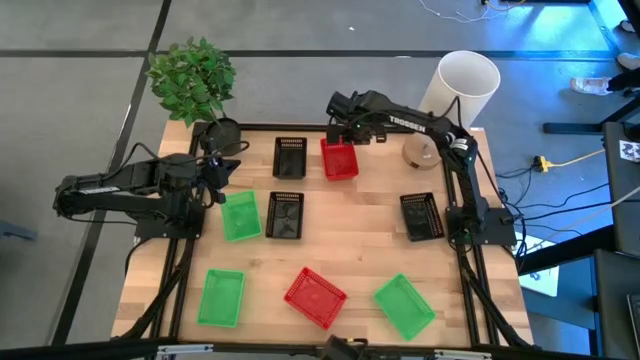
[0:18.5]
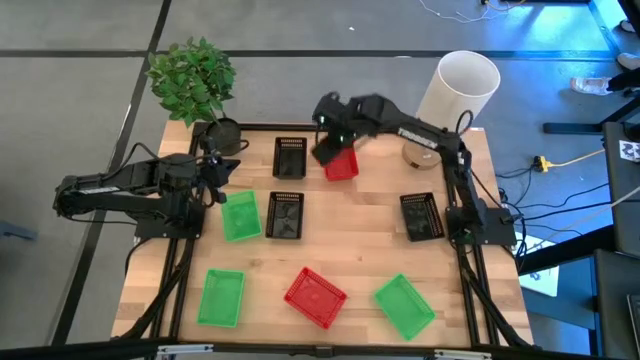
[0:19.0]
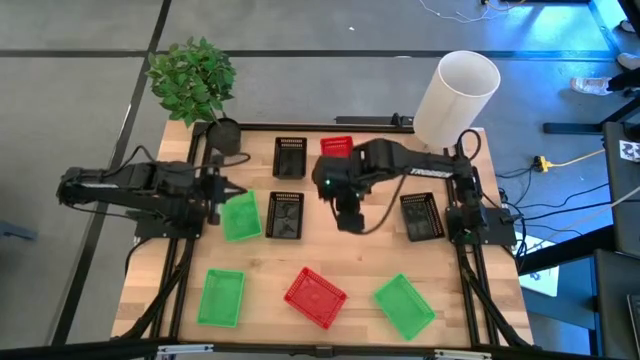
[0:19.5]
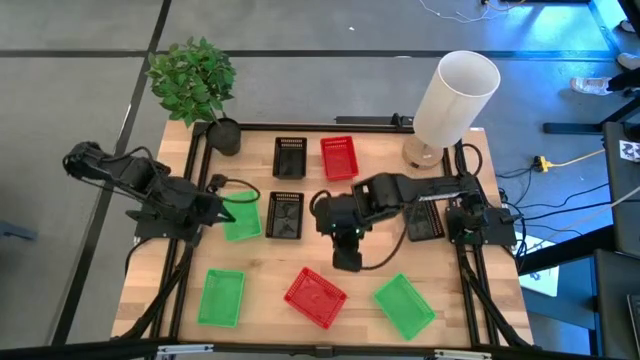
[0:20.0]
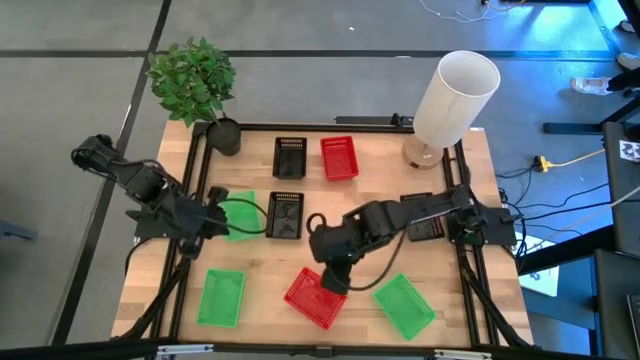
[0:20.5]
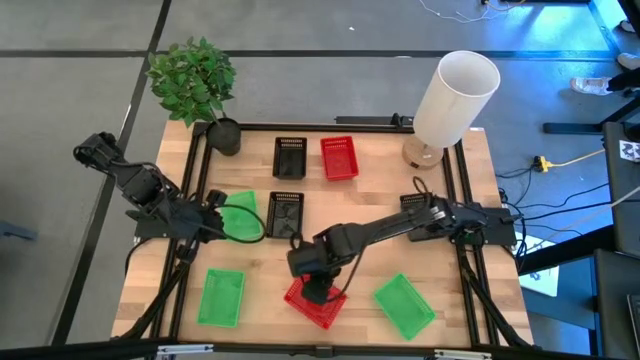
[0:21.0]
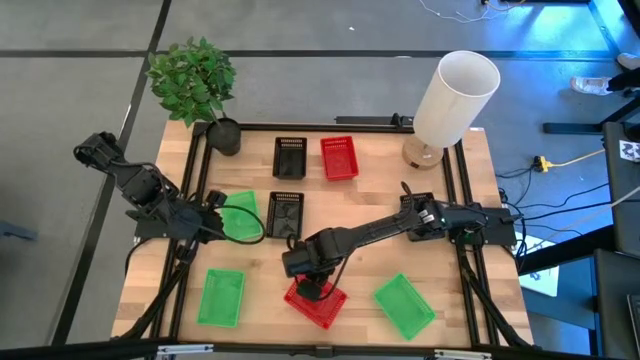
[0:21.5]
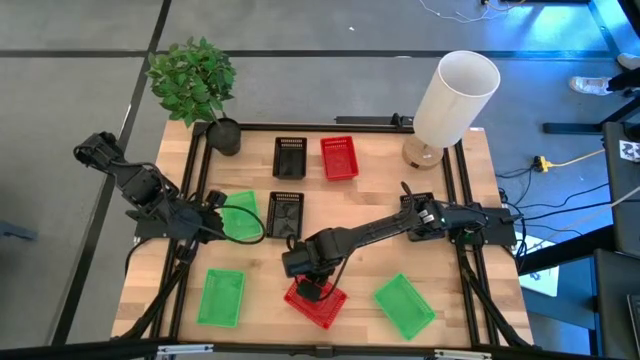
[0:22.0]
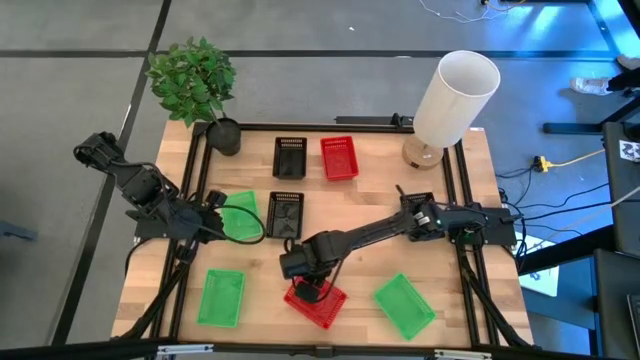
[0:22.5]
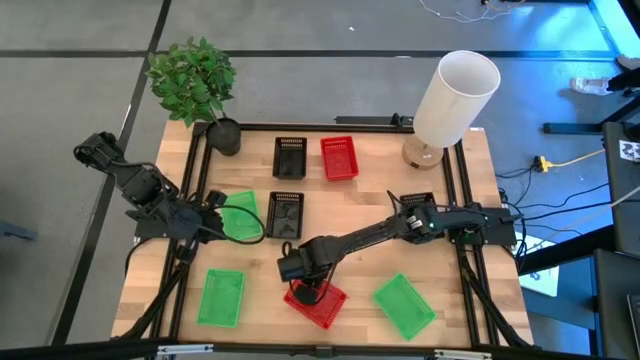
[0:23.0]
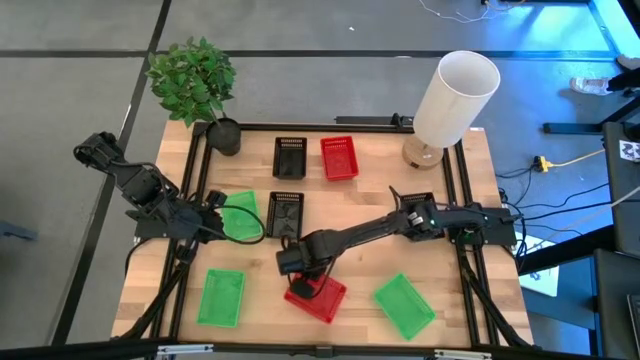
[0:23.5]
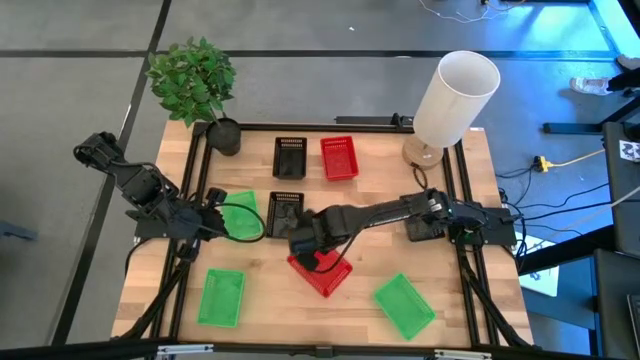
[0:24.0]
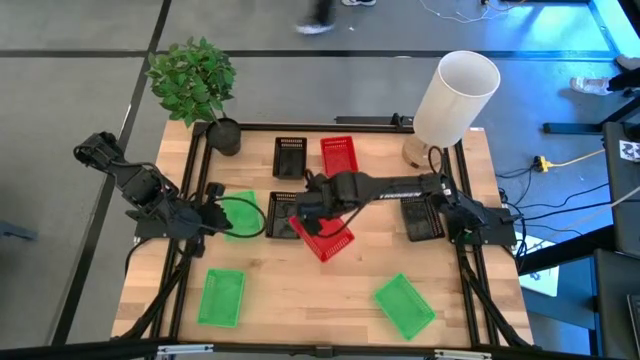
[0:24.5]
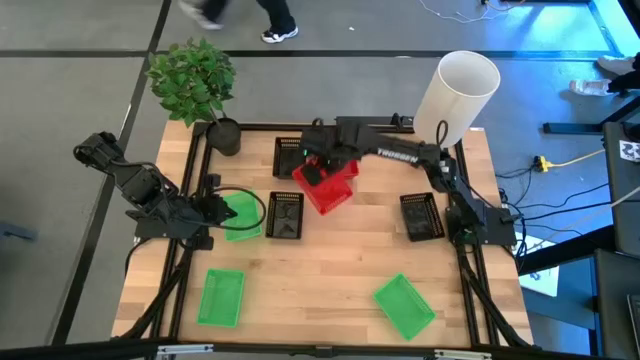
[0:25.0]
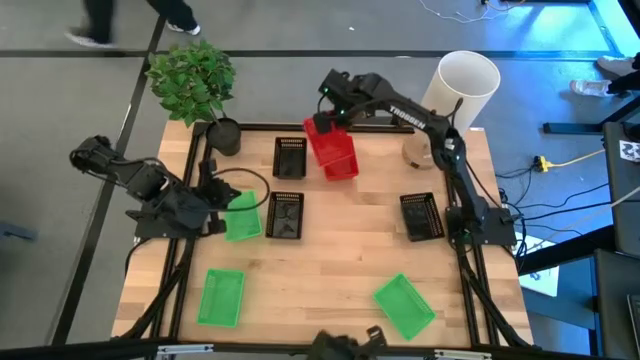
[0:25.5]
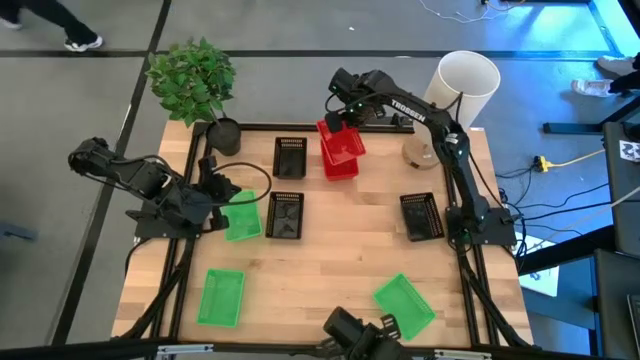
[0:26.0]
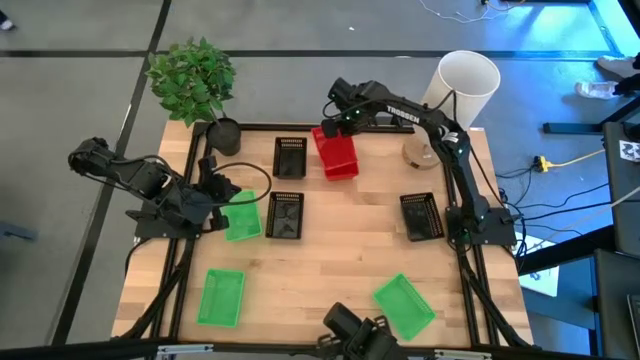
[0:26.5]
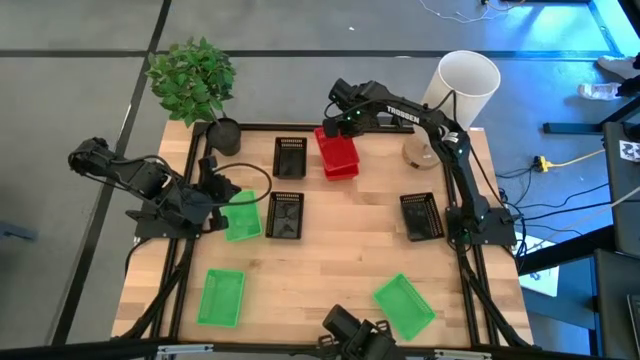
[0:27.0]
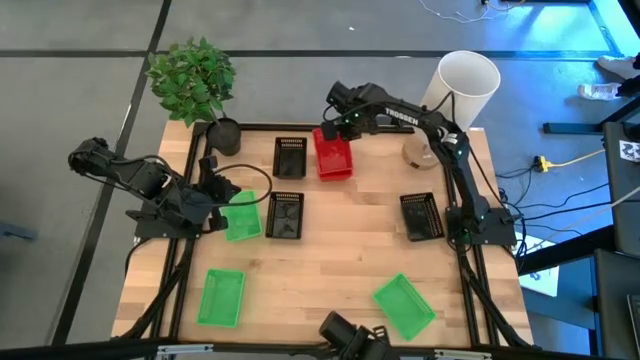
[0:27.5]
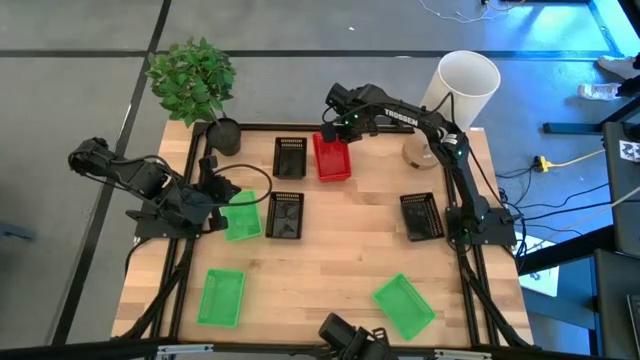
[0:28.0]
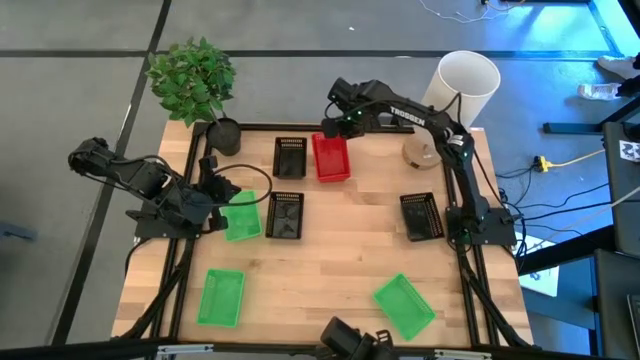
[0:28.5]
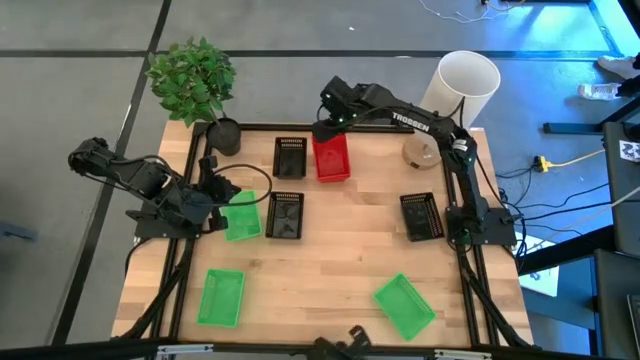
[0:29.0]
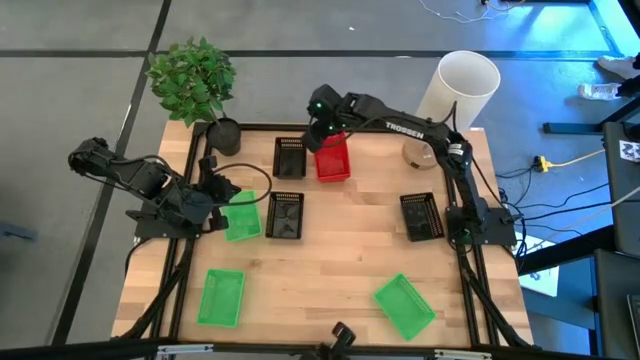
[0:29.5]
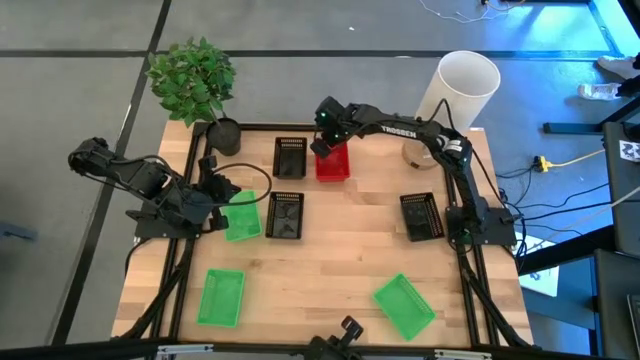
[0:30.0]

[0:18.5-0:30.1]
Stack the bottom red bin on the top stacked red bins

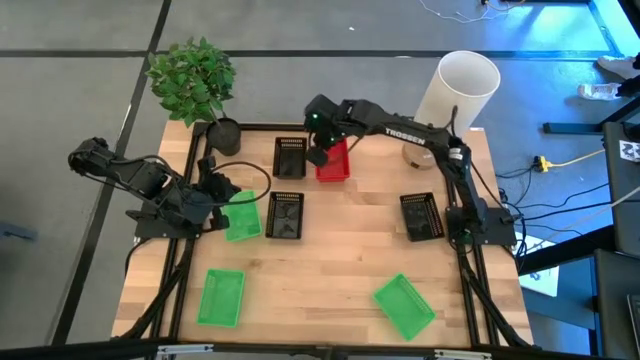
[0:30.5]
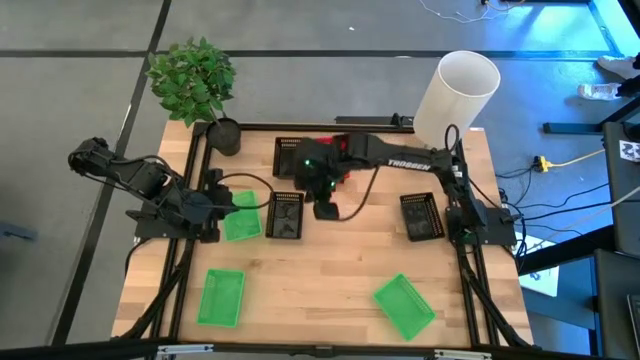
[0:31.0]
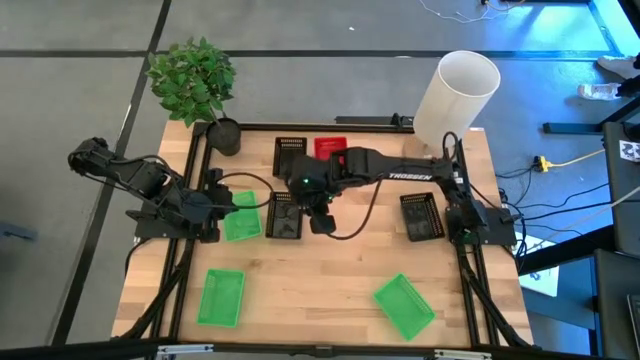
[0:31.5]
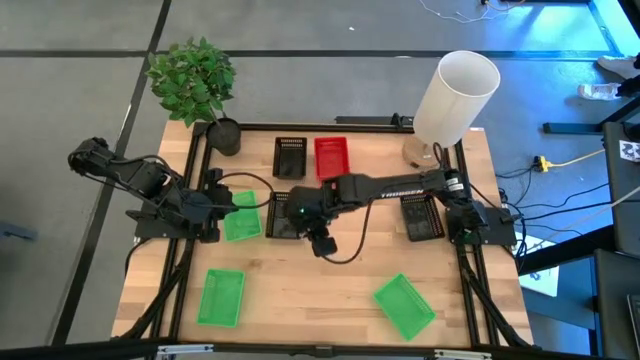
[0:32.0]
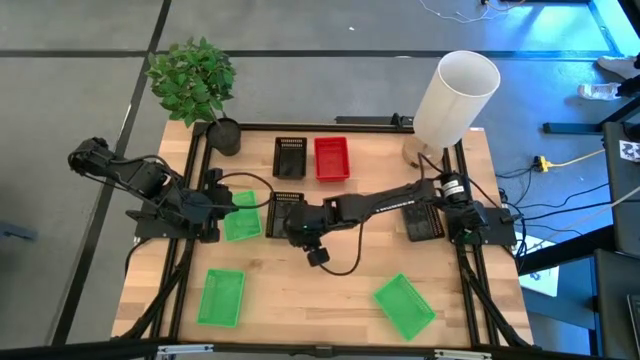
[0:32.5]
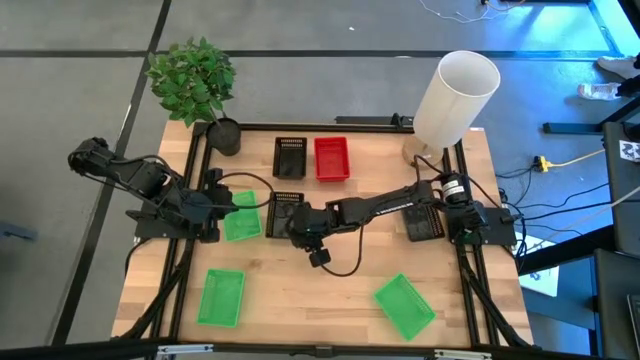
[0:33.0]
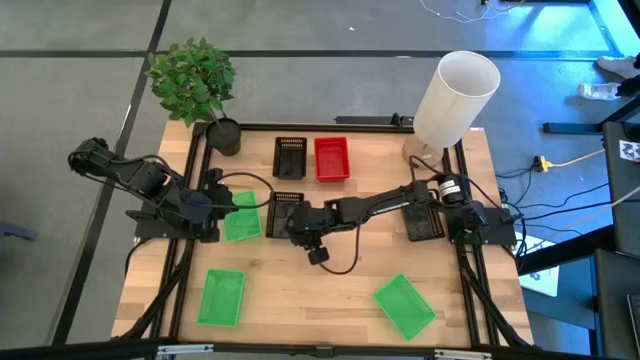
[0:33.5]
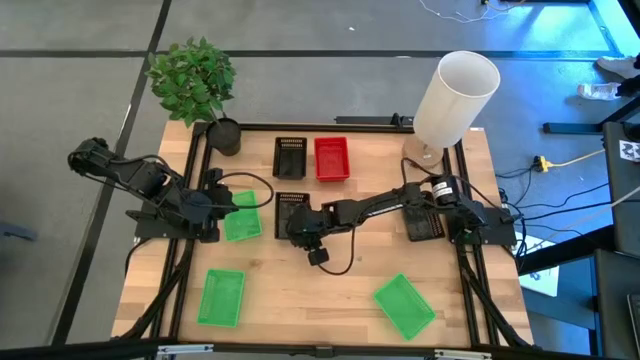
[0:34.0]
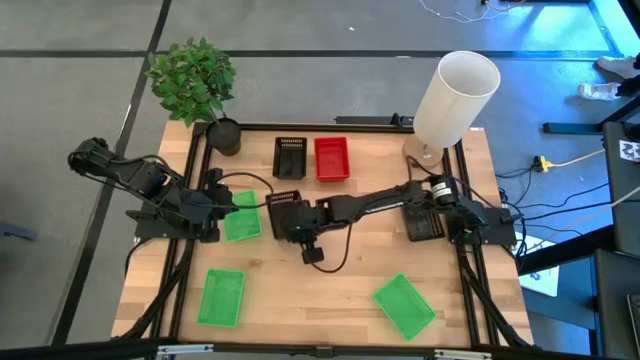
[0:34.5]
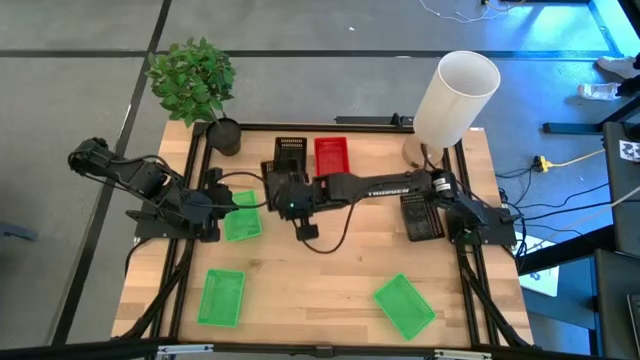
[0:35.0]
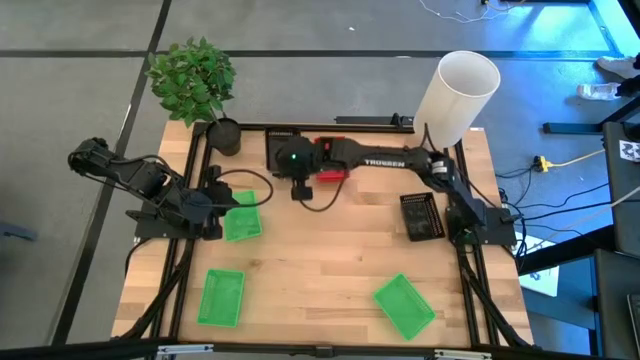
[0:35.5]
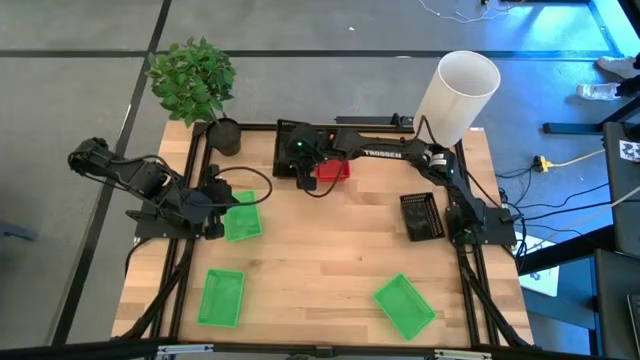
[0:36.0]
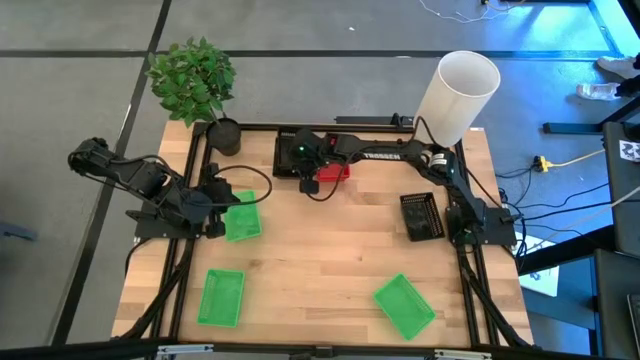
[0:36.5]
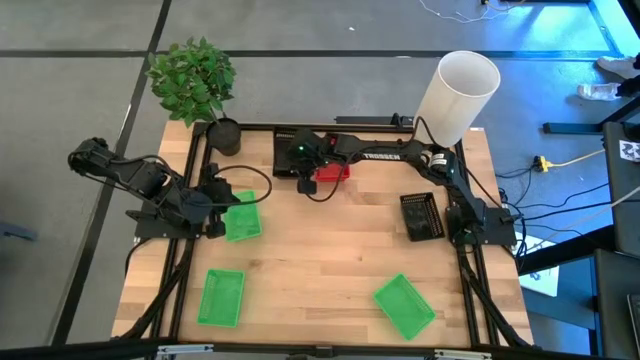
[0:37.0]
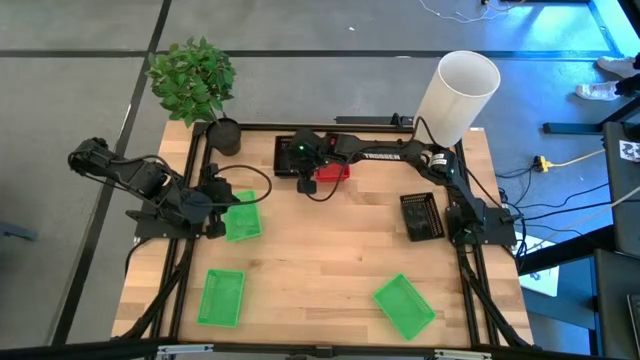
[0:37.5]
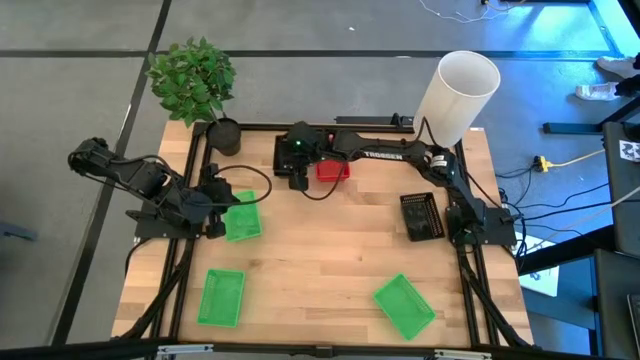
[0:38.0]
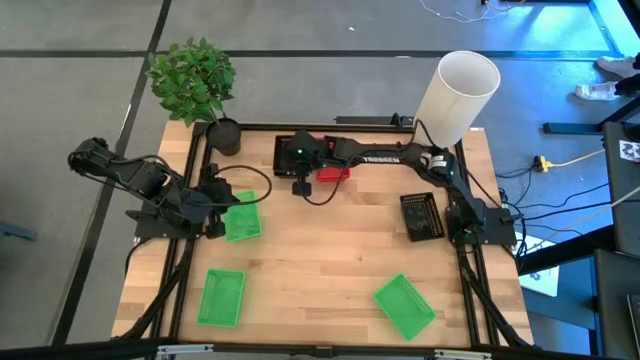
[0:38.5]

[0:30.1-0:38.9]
Stack the middle left black bin on the top black bin
